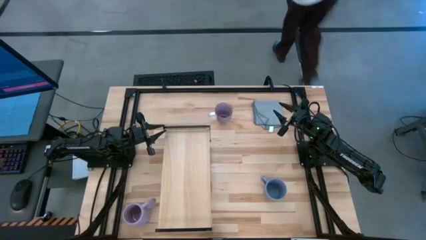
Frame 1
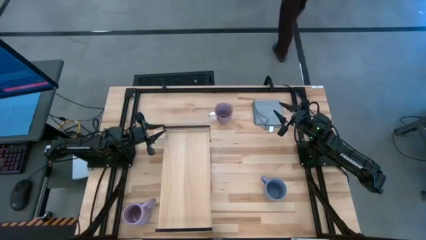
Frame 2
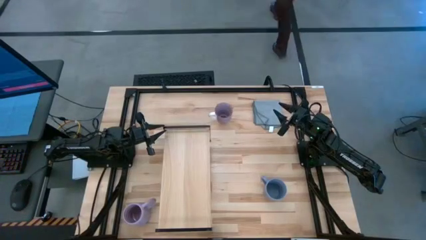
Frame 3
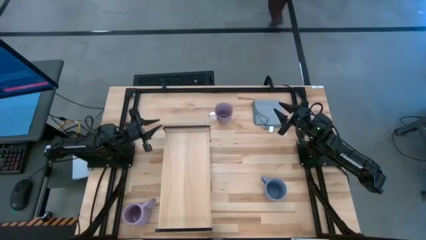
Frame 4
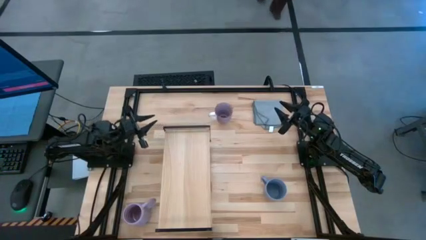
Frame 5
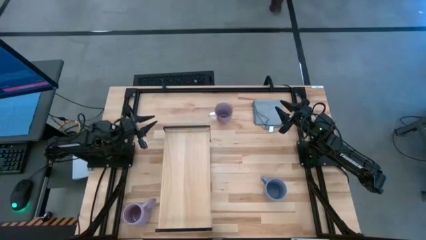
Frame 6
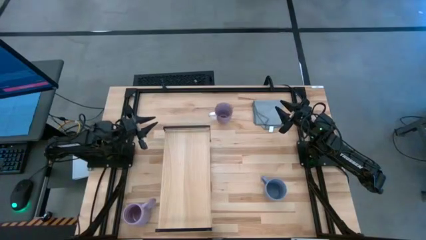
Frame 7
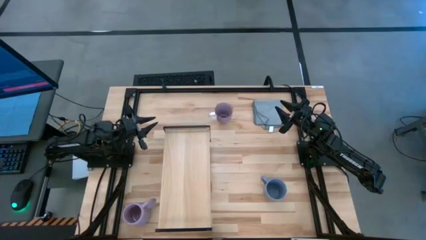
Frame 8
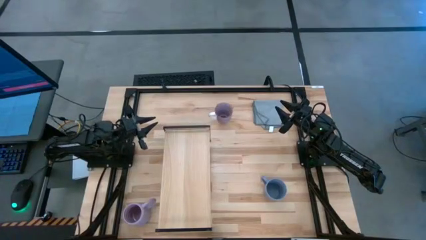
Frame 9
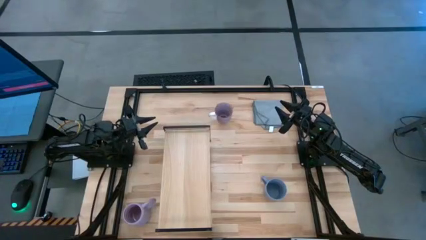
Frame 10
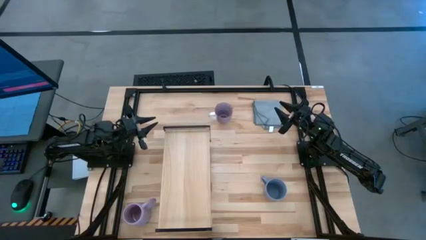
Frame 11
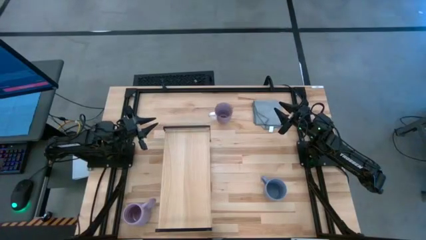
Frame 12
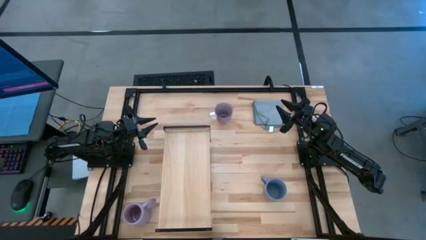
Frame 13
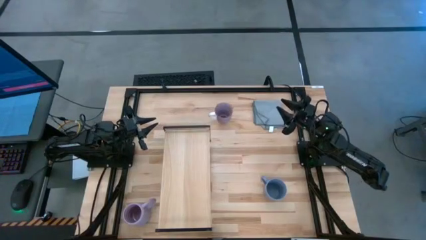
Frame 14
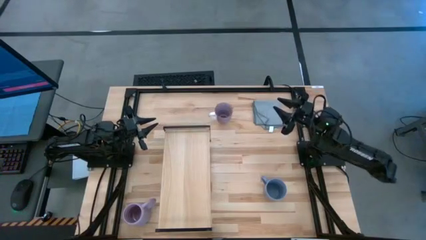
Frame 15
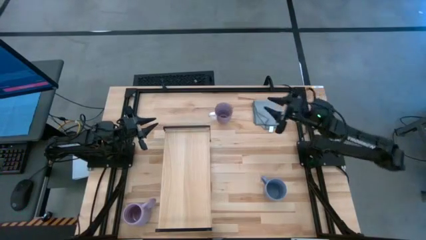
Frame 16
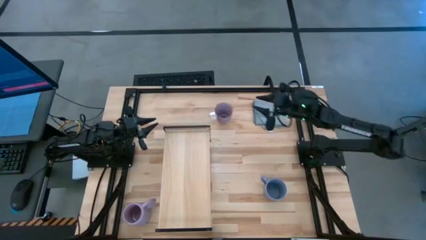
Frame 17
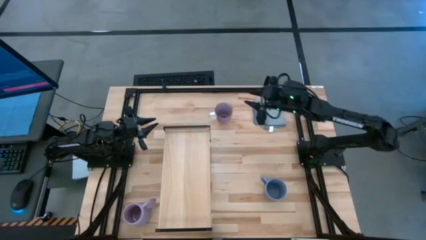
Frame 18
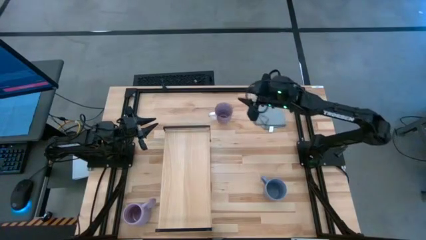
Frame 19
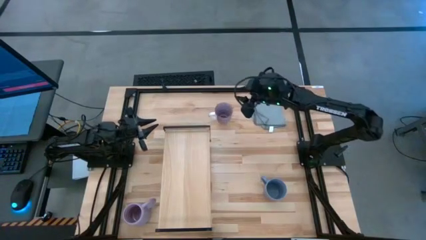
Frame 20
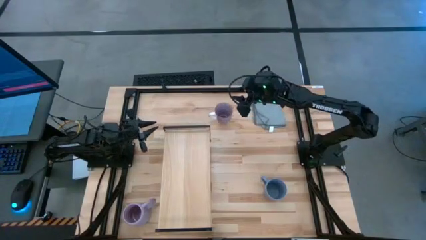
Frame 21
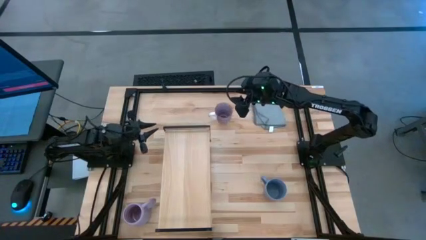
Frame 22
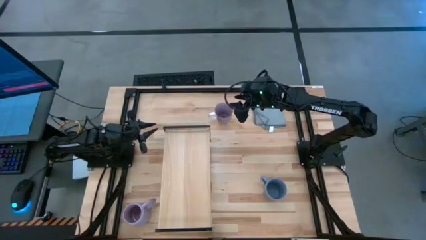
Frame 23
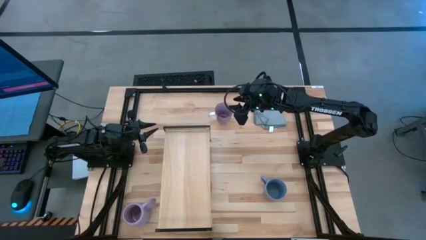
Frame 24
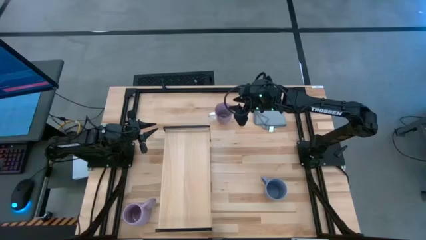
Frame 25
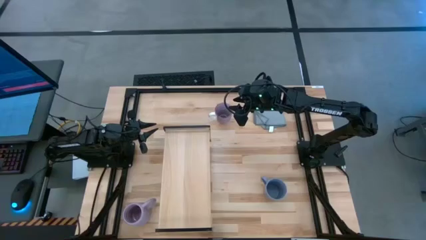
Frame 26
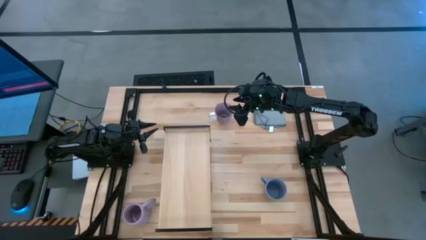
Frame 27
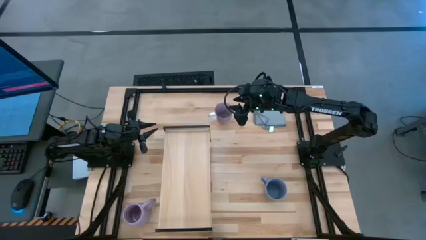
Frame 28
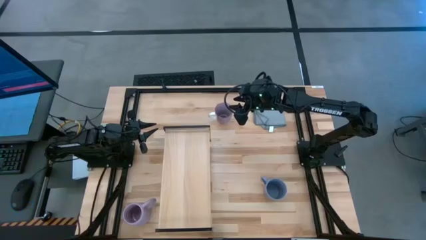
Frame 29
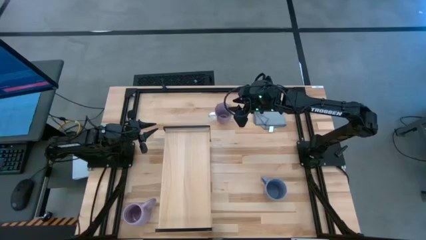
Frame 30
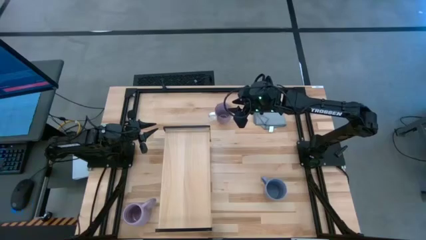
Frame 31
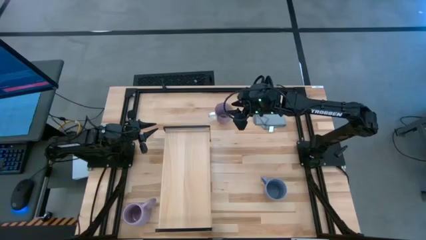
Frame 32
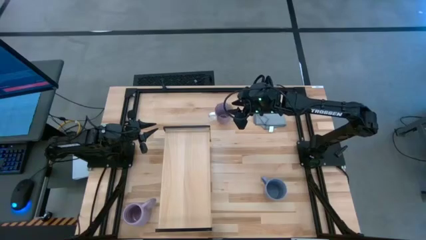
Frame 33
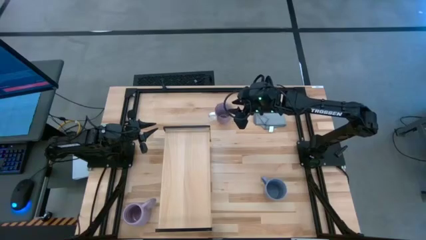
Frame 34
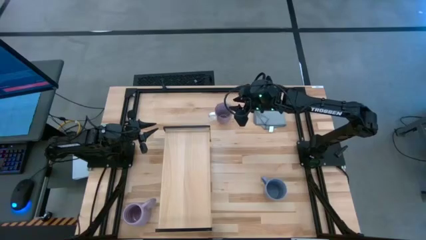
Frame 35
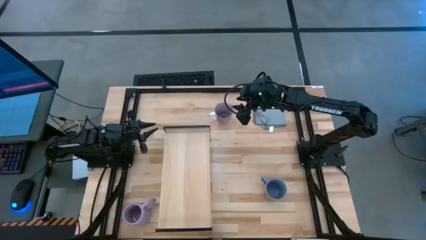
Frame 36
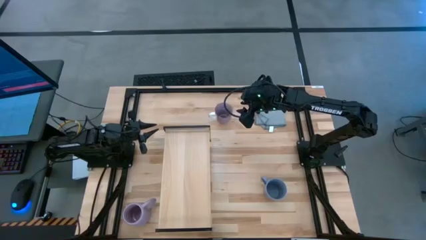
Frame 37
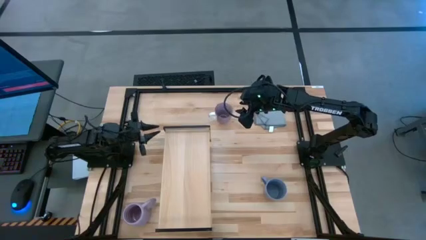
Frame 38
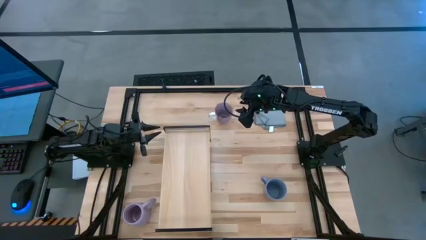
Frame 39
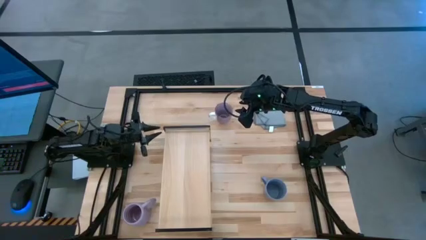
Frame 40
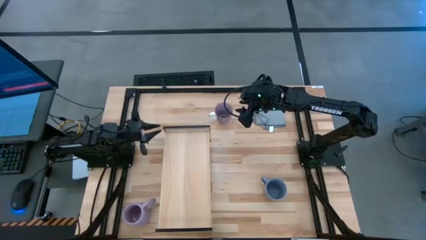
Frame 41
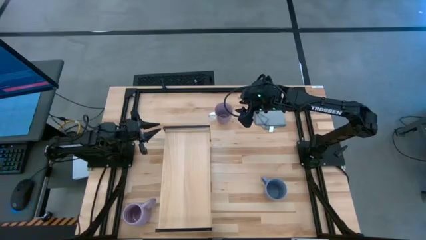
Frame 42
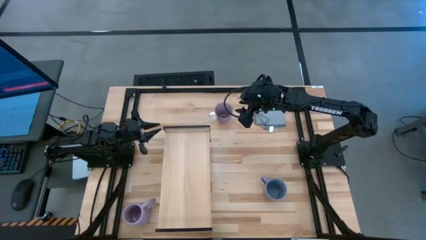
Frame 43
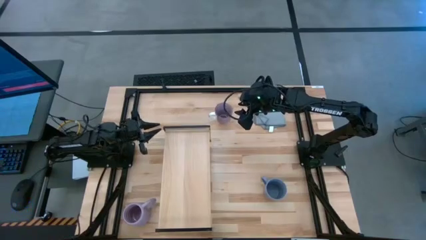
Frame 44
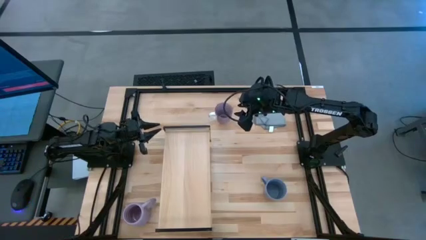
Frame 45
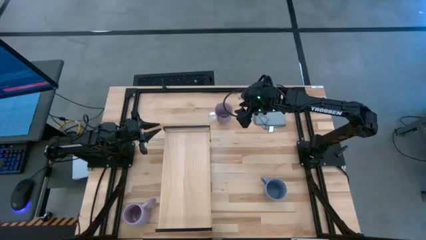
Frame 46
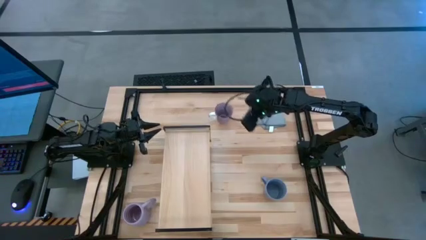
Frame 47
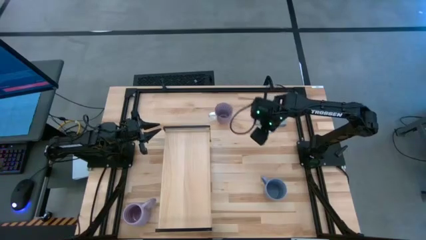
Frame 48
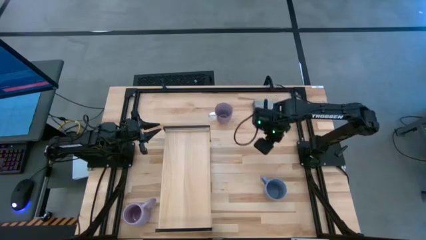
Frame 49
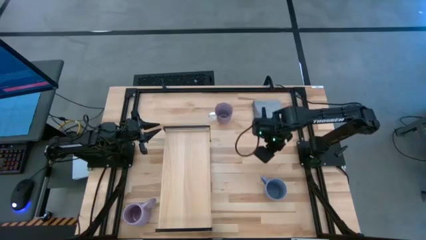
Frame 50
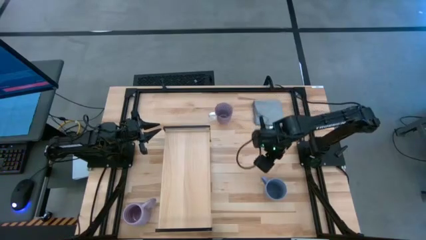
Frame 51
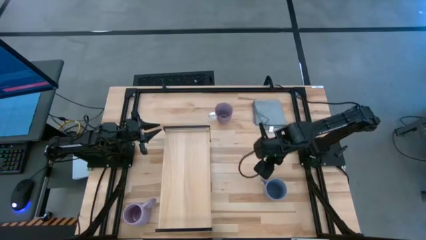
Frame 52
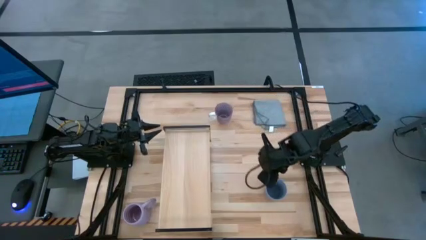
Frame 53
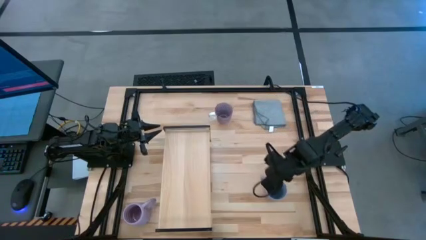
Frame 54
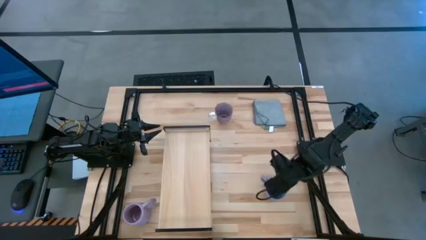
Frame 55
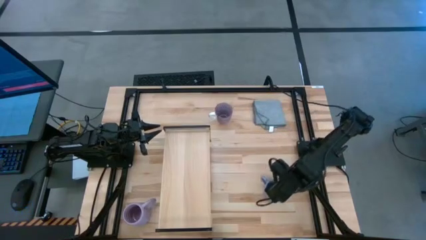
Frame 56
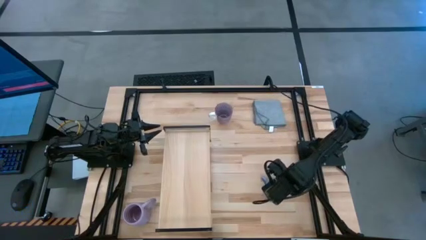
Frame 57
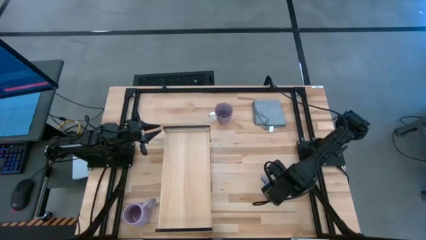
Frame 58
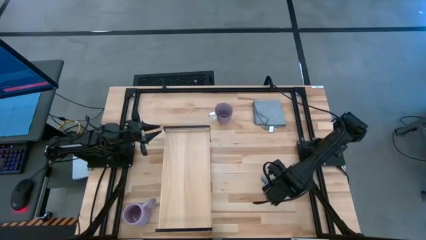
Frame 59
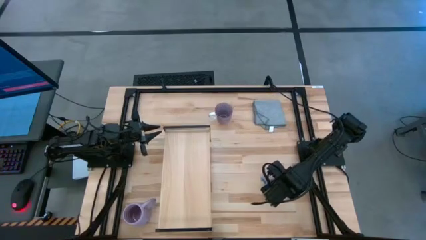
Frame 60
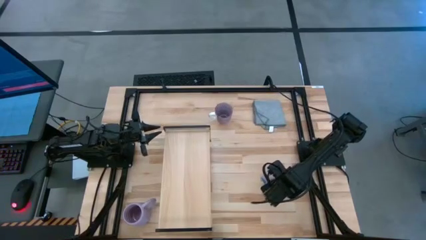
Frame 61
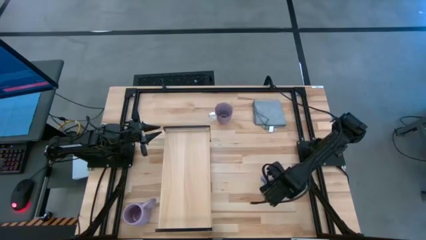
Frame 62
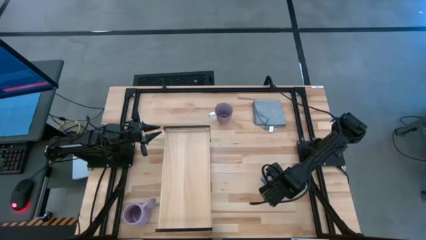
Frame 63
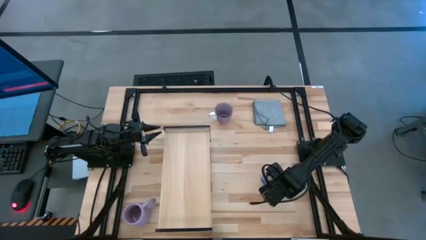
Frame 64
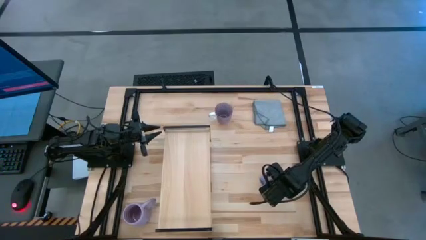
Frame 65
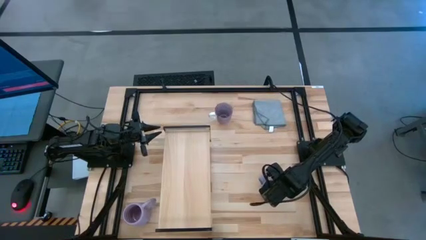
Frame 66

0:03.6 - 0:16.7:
Task: Stack small to large cups/mugs on shelf
Put the blue mug on the shelf
